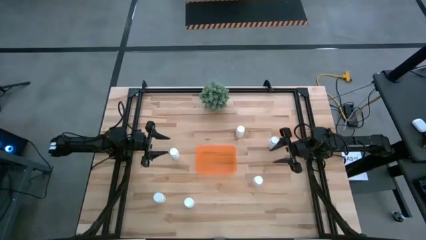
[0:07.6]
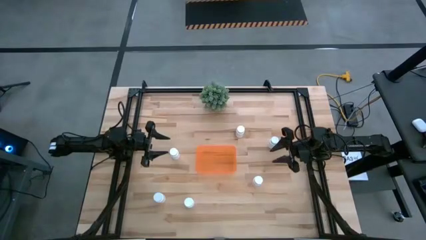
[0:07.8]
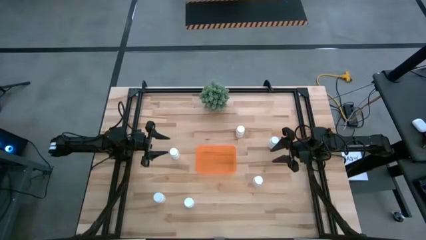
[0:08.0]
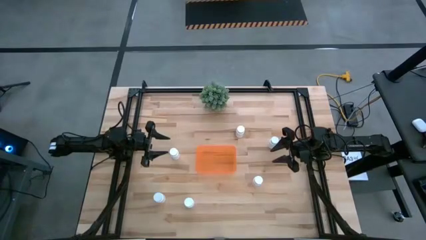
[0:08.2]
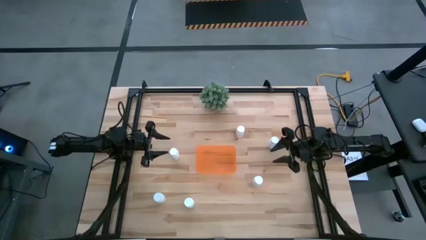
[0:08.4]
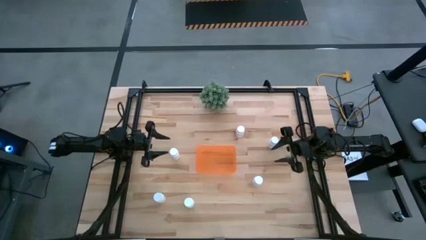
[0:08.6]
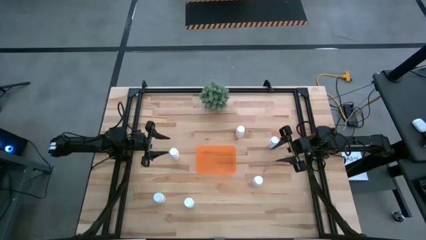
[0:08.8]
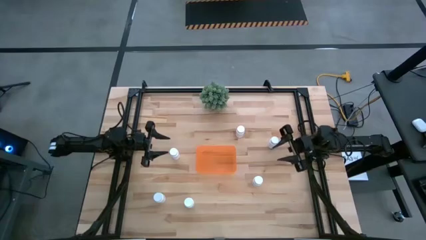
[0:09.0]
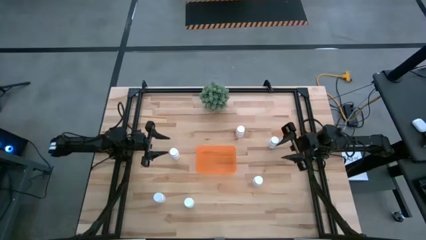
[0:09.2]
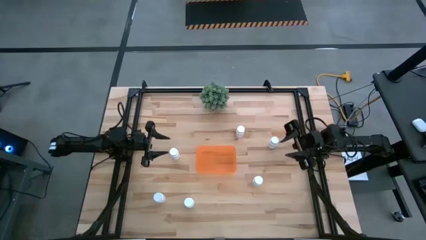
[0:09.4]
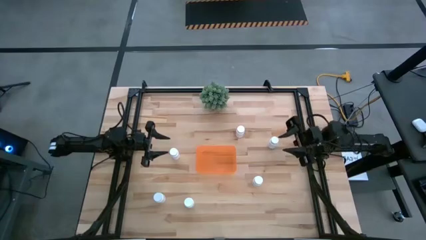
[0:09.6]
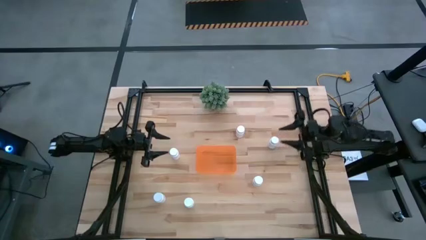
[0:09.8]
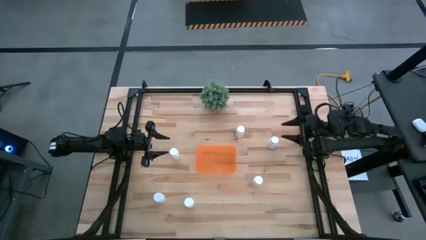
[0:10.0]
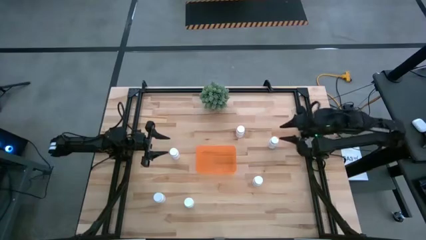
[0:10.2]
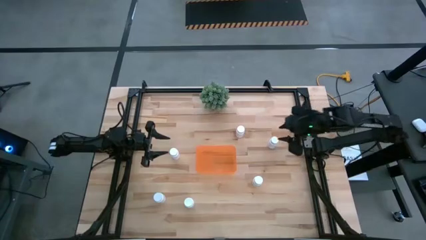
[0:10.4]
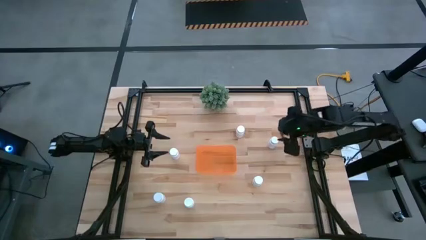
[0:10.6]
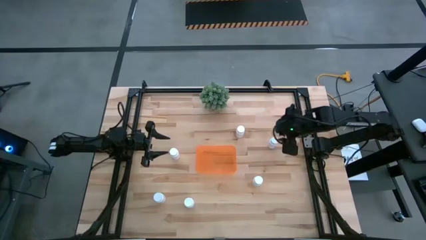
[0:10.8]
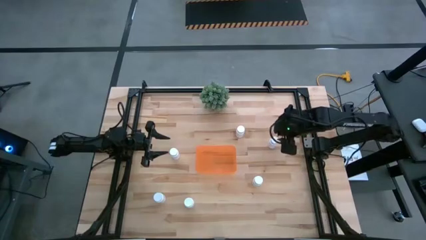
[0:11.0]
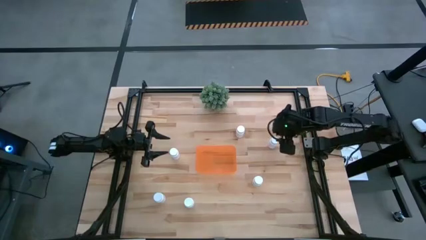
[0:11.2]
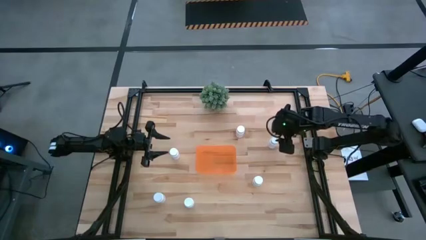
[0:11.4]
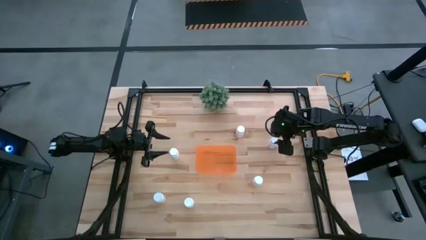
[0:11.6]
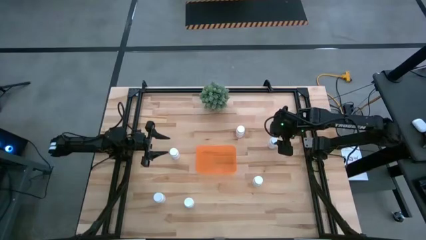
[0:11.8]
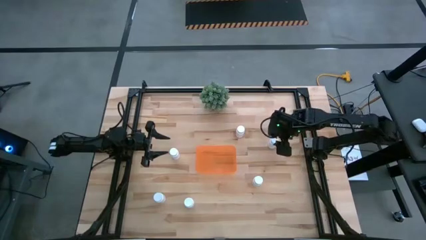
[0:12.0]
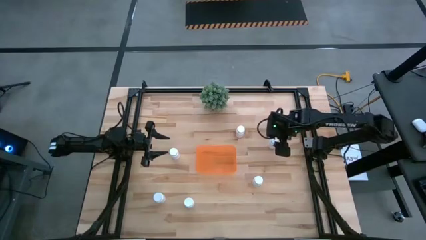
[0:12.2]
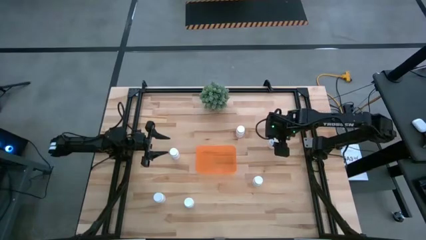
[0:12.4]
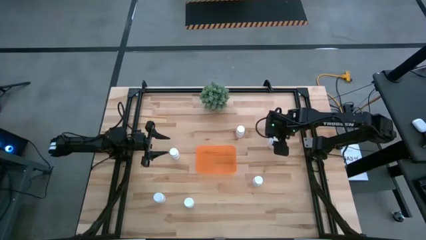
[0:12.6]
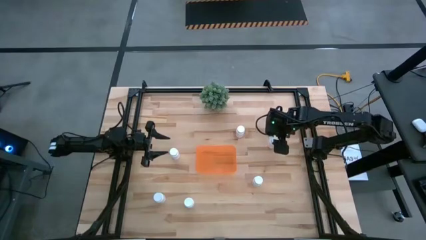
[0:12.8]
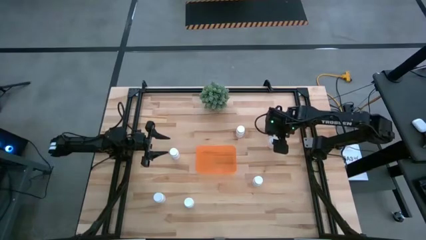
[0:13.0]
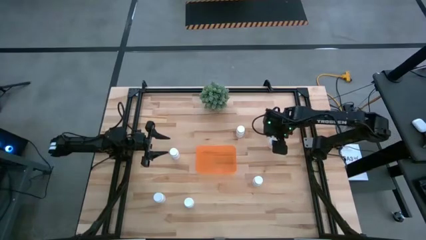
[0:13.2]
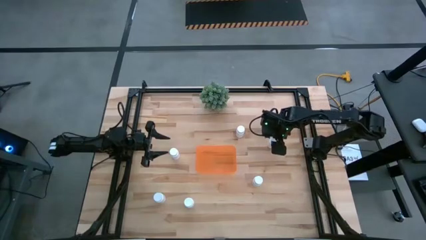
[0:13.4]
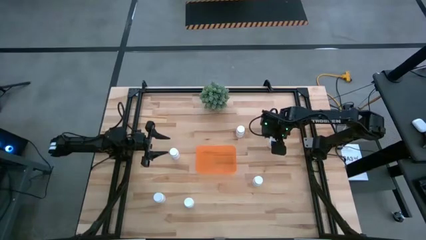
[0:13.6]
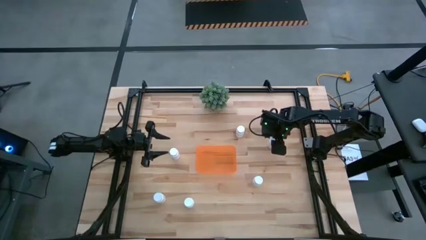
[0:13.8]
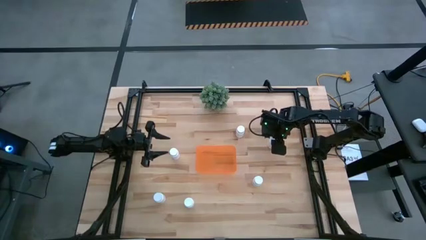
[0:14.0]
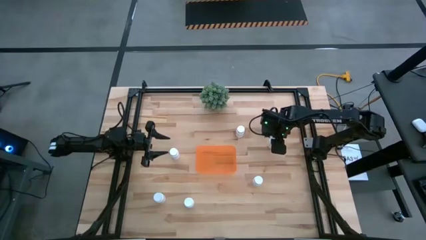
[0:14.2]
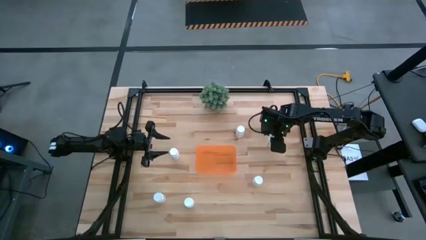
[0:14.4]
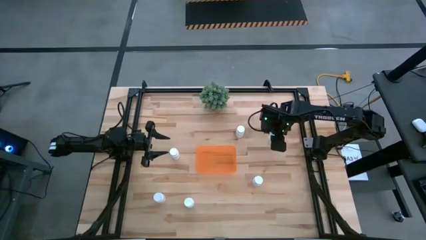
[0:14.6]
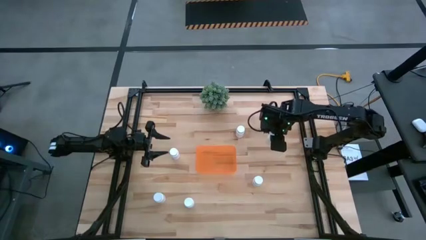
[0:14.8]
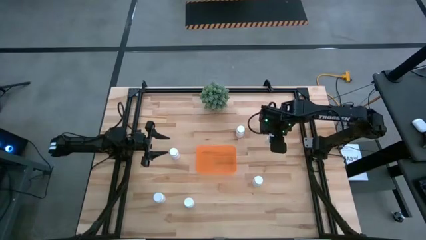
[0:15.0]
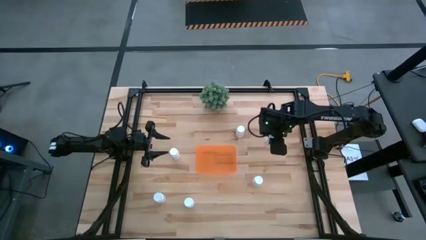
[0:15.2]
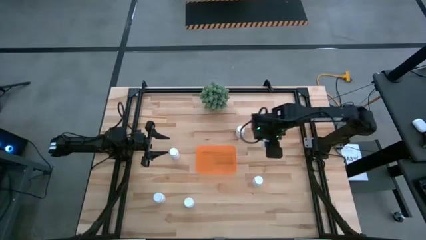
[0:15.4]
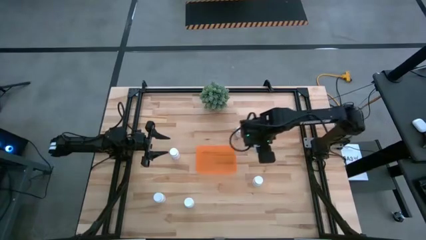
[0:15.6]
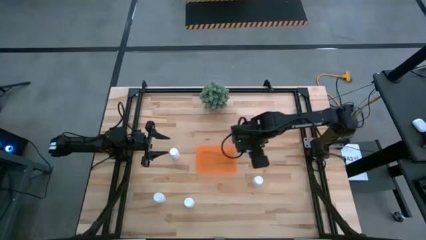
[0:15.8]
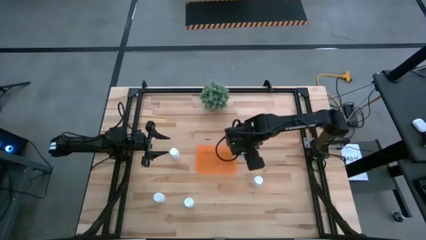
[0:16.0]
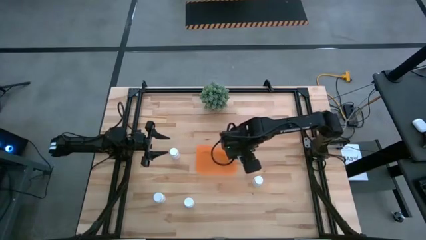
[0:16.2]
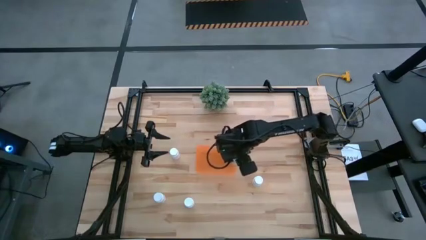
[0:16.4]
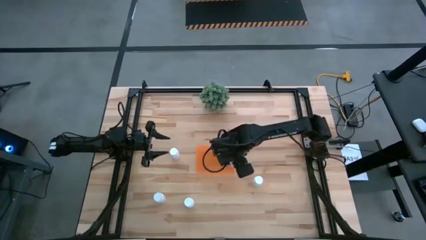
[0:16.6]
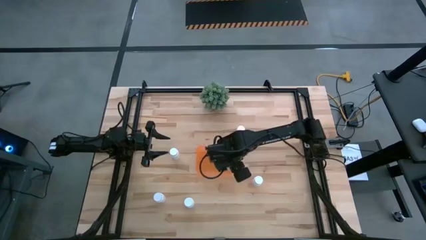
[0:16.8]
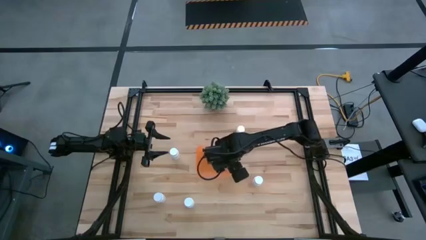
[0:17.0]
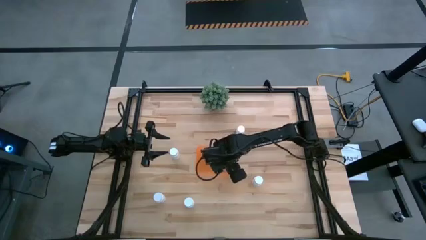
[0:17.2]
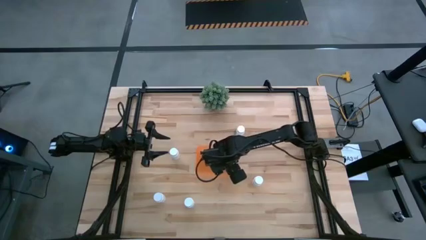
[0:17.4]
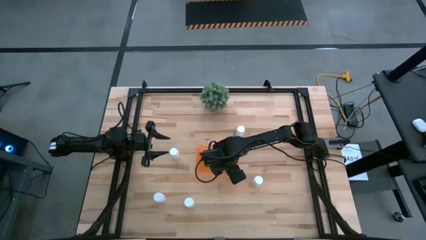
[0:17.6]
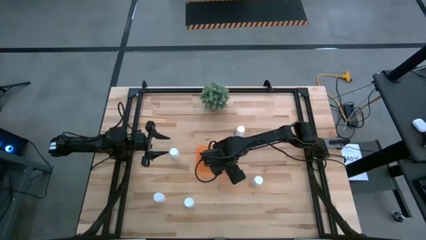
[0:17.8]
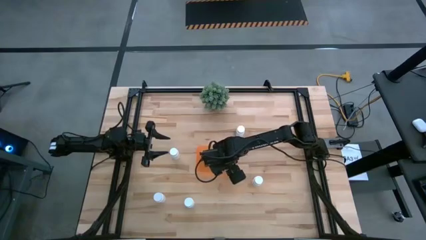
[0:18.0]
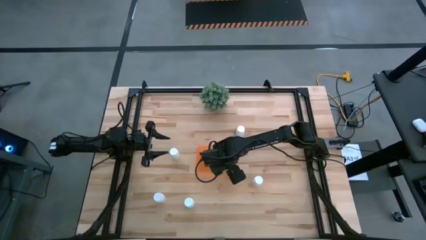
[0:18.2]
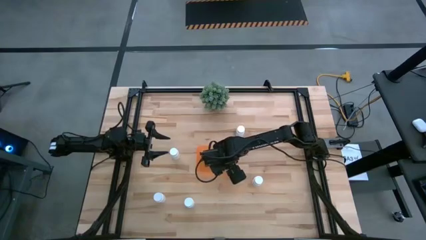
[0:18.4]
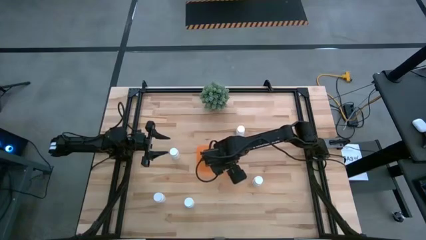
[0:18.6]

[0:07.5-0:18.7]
Task: Pick and place pill bottles into a basket
Put the white medicine bottle into the orange bin
